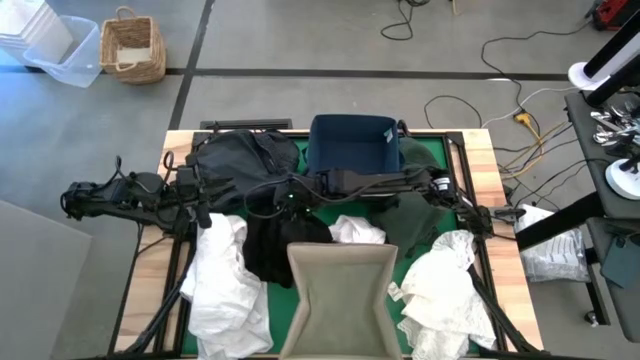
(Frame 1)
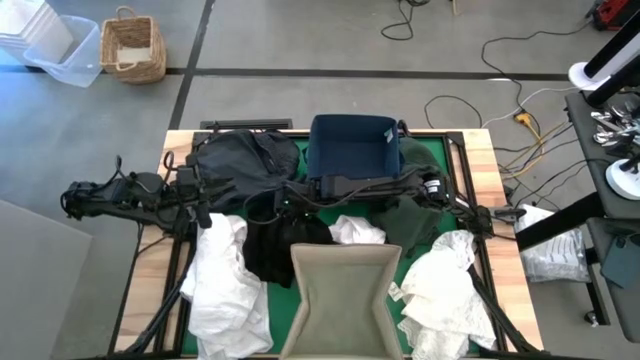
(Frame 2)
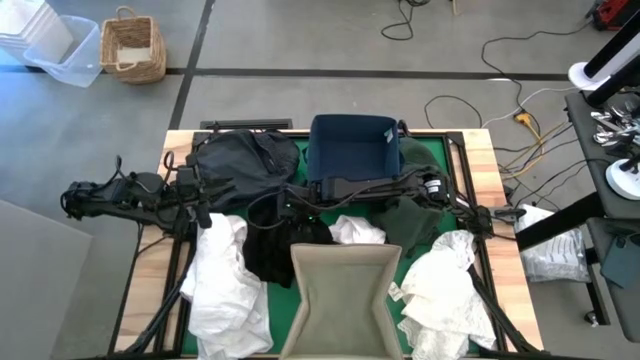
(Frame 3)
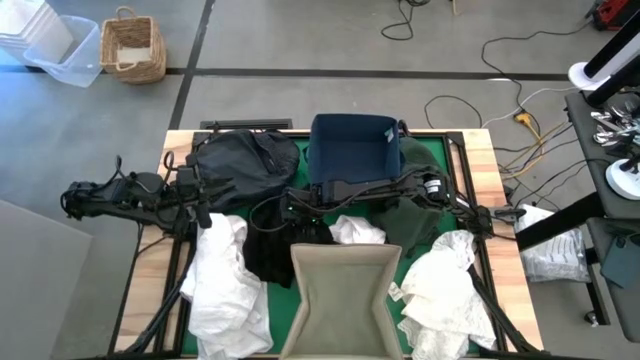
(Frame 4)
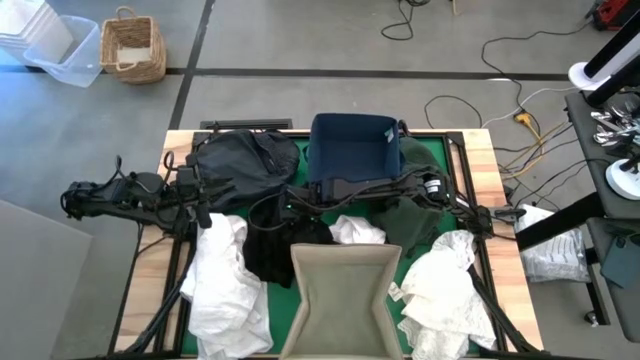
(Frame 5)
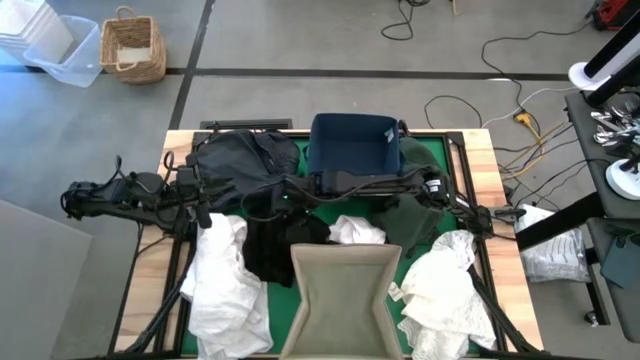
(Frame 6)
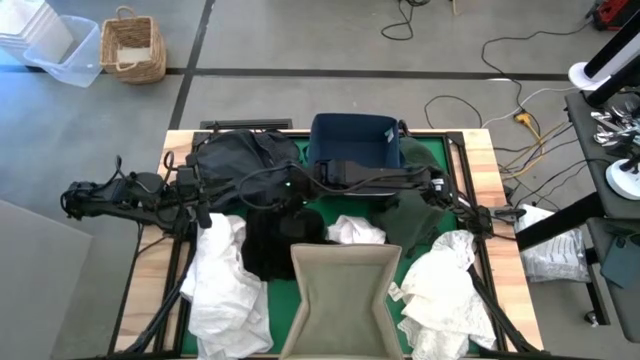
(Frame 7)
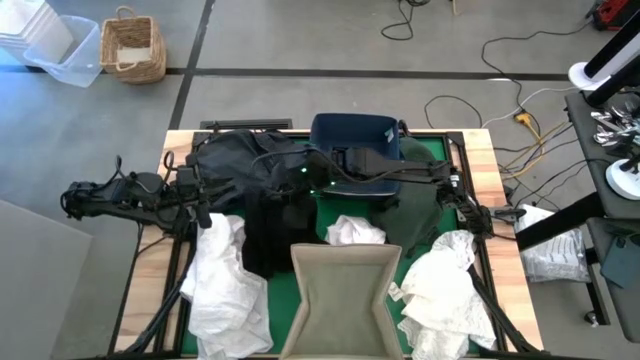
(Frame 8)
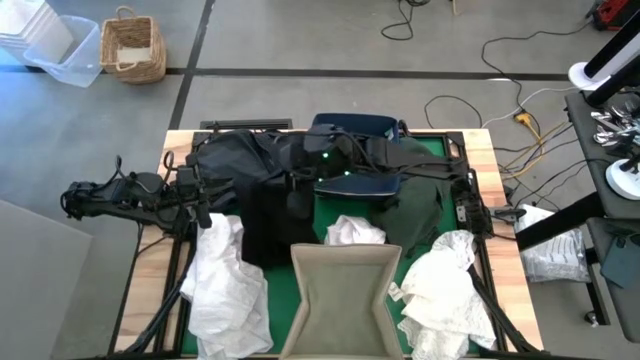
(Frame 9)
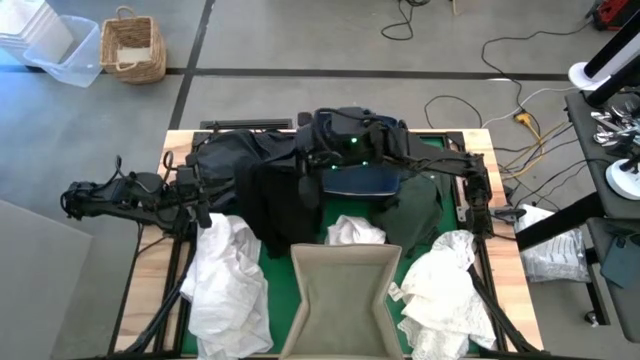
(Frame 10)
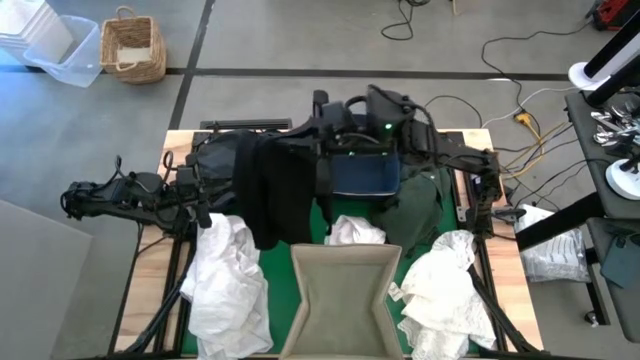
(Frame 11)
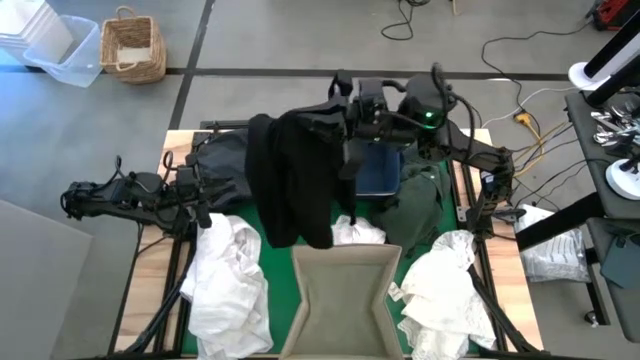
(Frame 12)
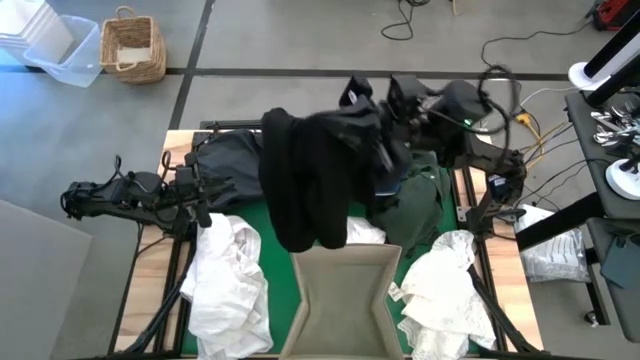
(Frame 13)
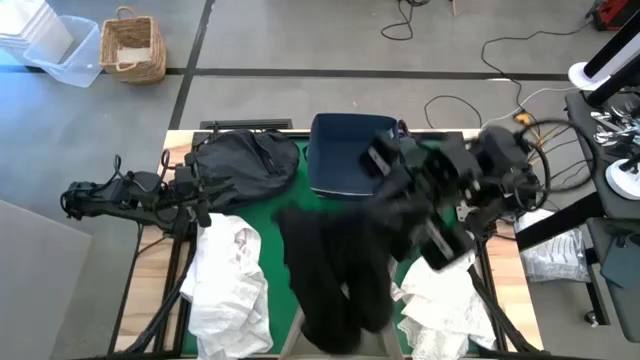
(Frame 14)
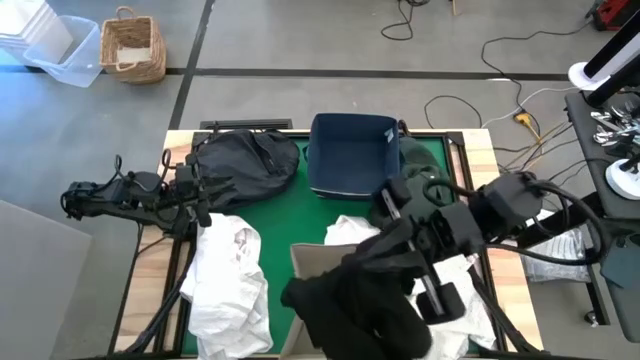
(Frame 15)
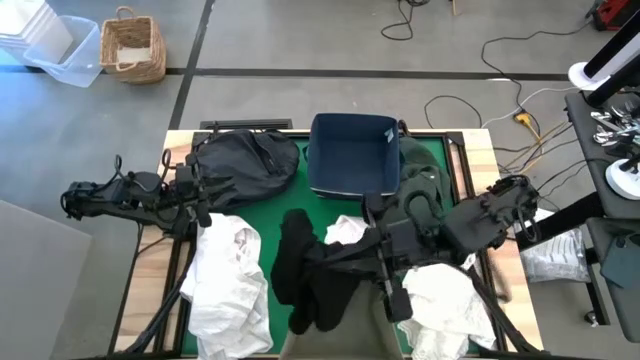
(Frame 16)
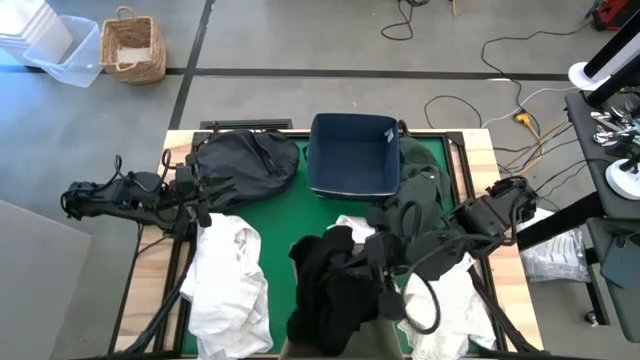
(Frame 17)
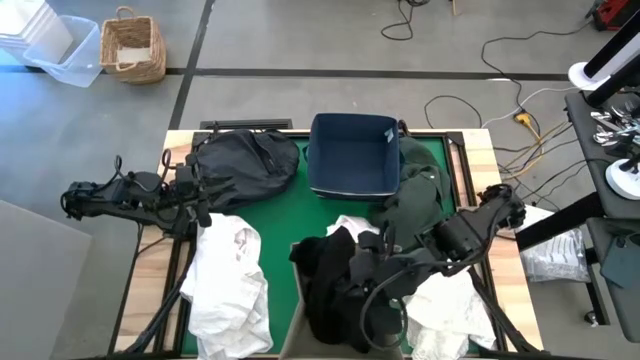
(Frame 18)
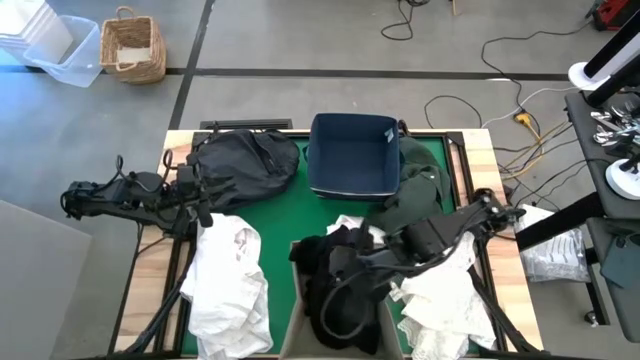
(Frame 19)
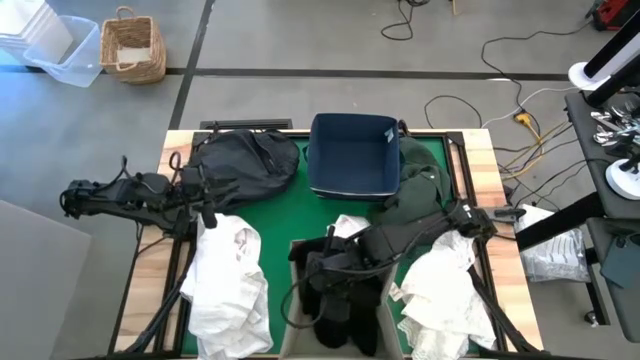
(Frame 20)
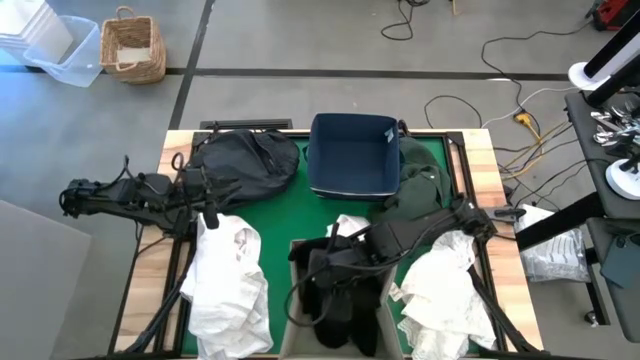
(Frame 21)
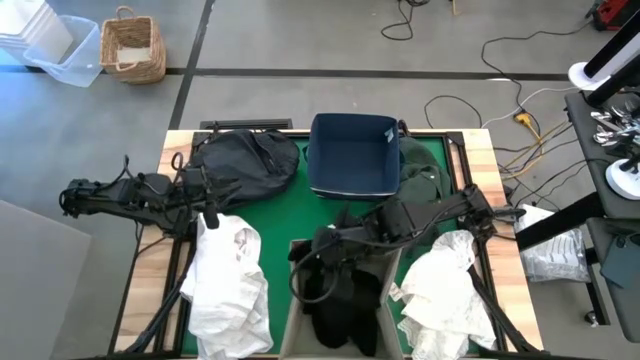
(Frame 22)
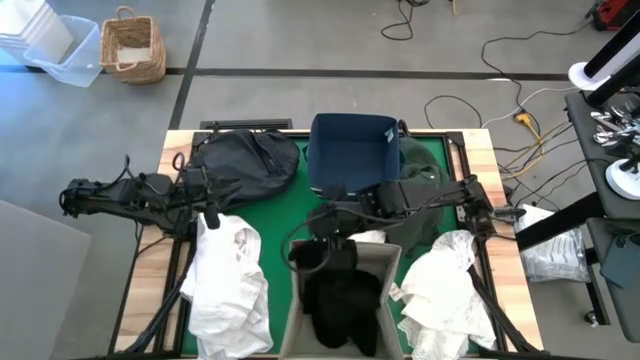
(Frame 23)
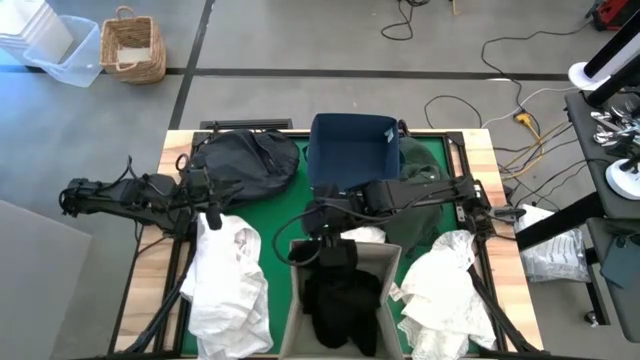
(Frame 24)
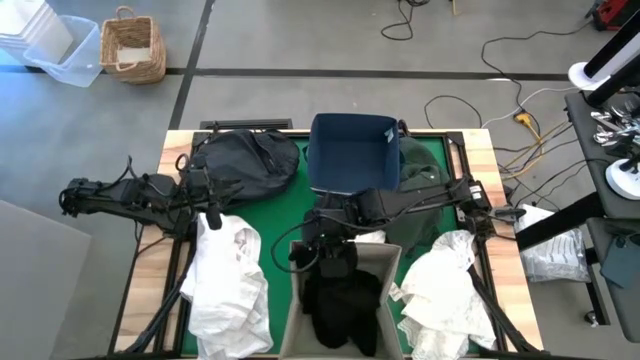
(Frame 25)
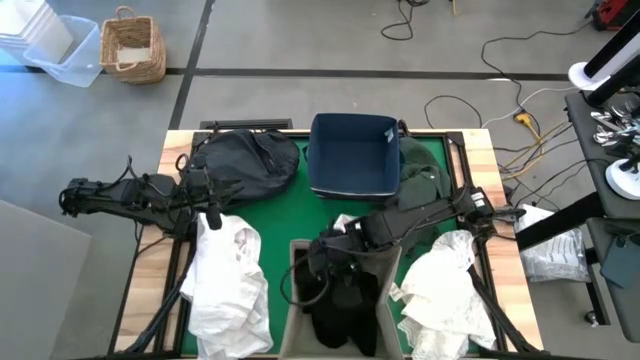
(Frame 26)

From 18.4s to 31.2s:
Put the black shirt into the white laundry bin

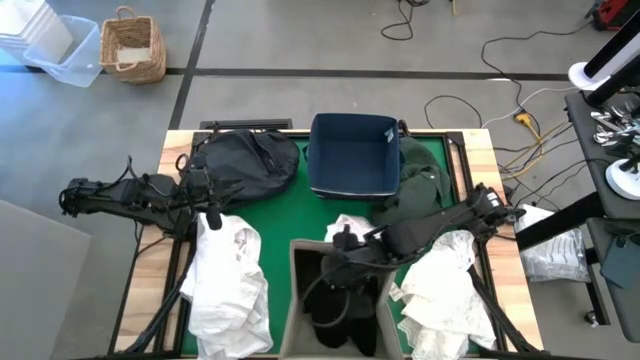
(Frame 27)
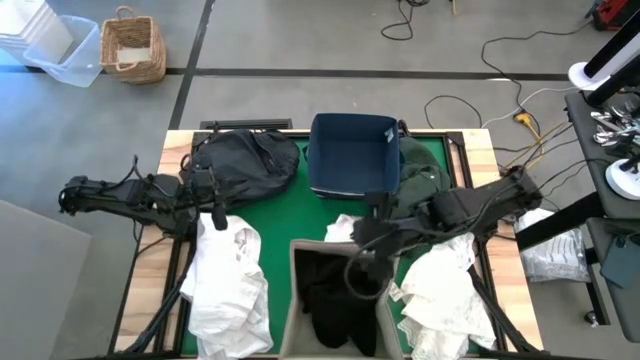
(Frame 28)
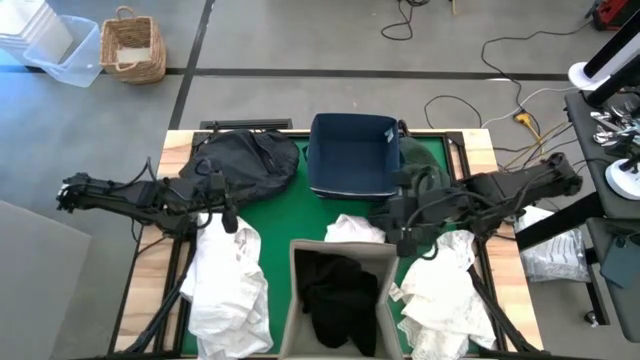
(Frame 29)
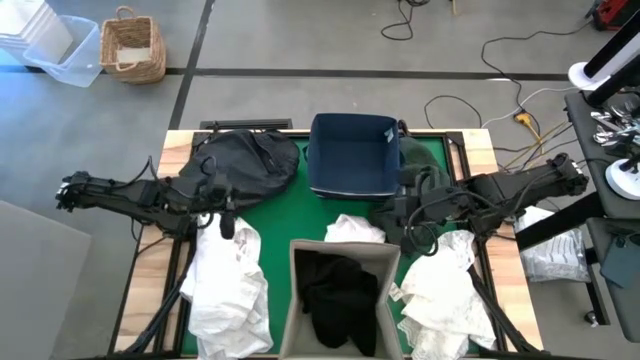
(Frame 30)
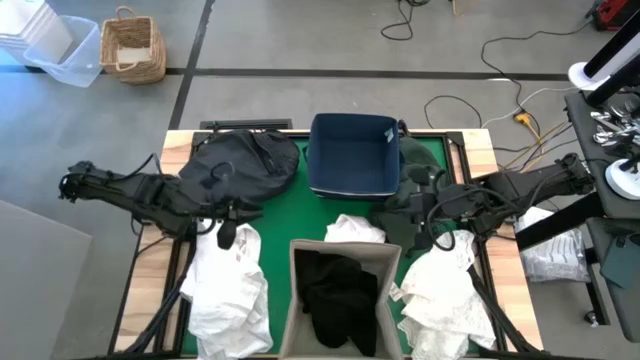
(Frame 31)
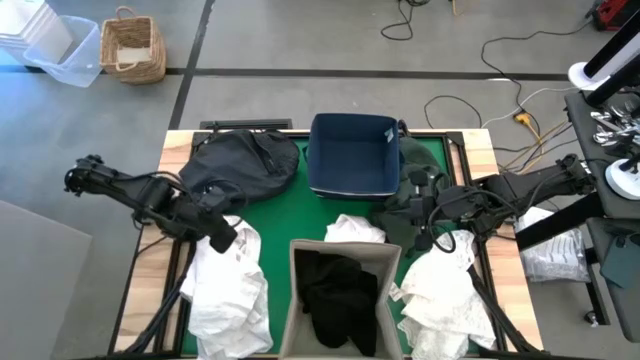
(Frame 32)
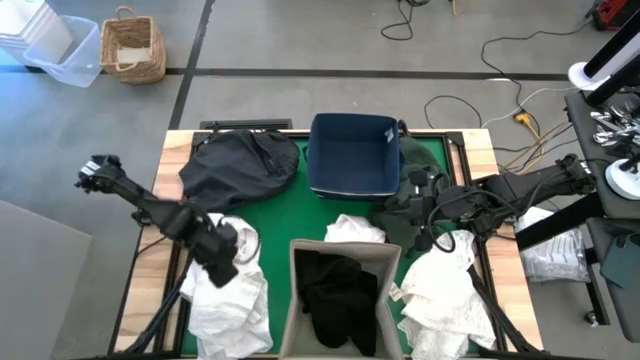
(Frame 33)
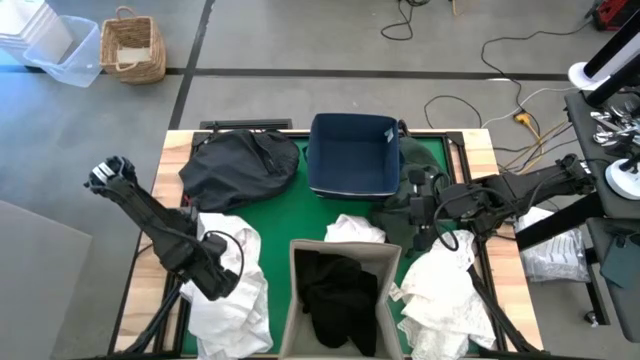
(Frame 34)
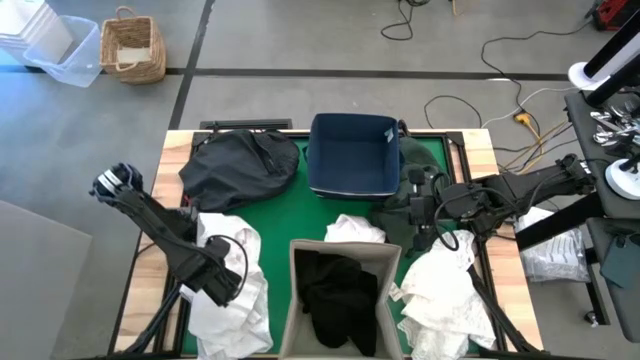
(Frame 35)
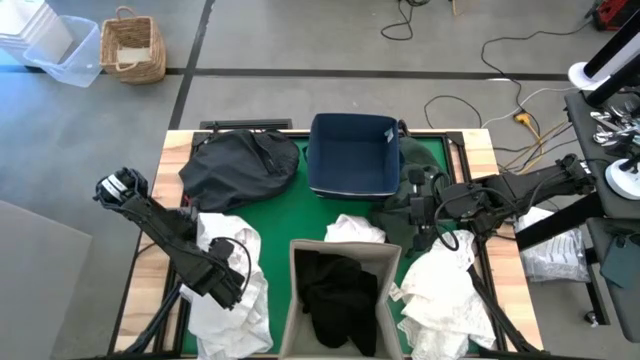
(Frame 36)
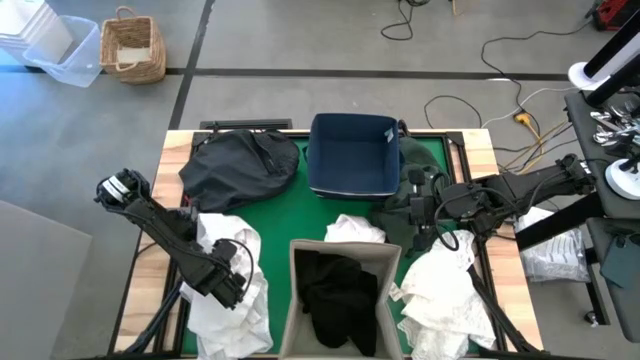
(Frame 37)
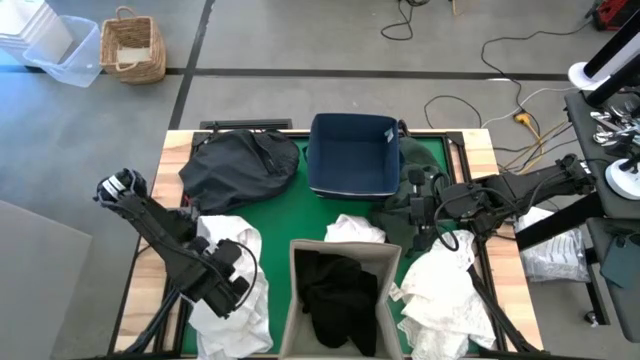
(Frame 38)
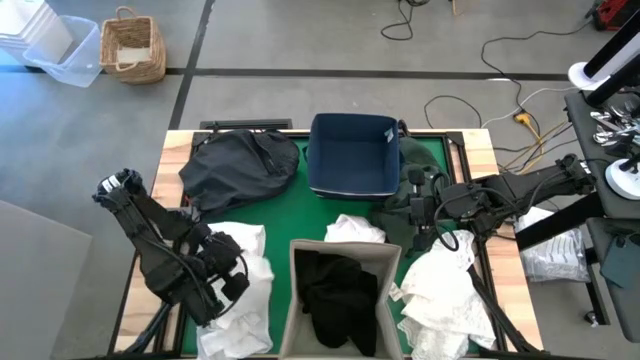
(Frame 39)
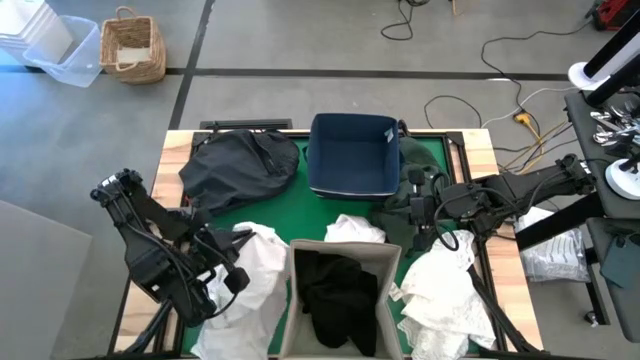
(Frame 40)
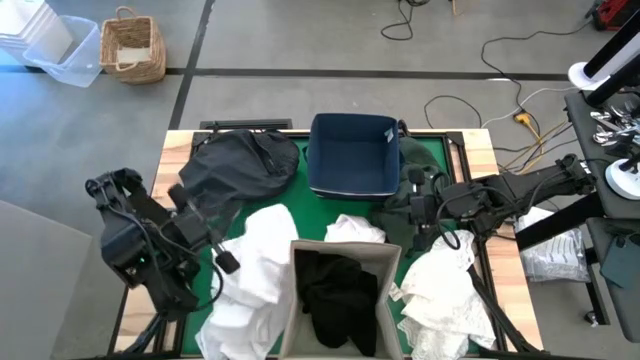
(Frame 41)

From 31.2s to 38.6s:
Put the white shirt into the blue laundry bin
